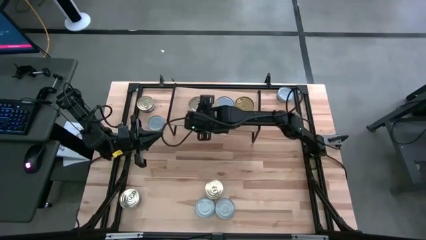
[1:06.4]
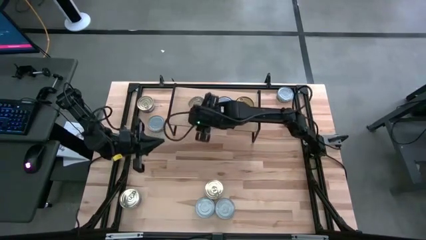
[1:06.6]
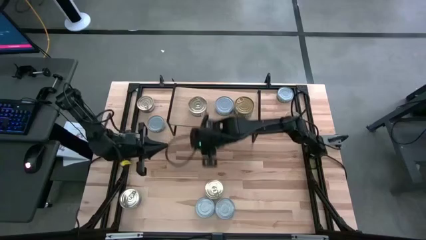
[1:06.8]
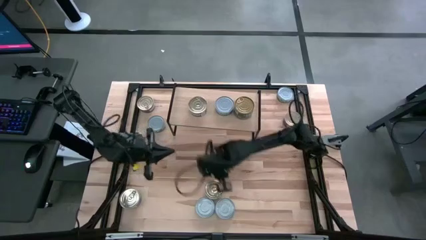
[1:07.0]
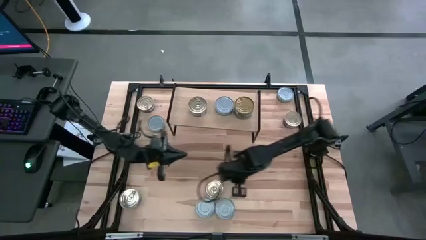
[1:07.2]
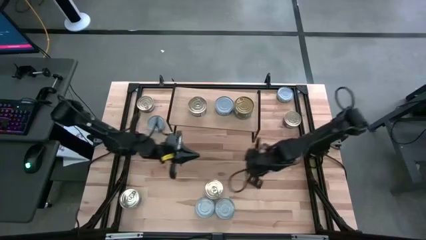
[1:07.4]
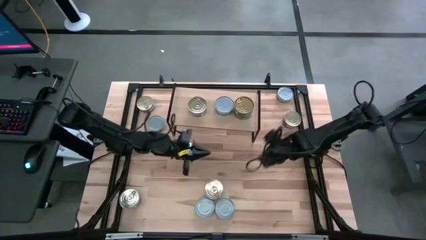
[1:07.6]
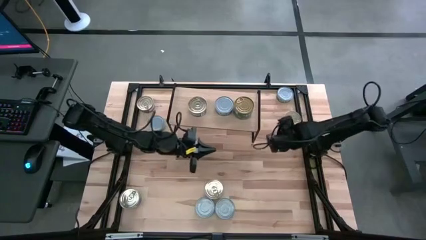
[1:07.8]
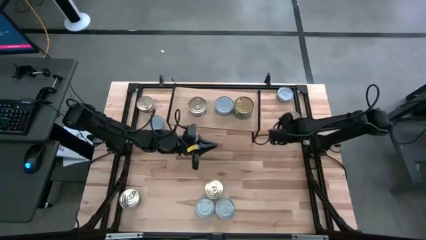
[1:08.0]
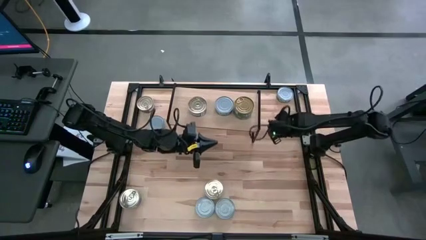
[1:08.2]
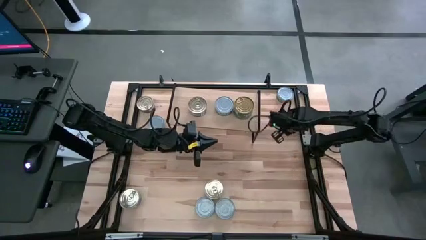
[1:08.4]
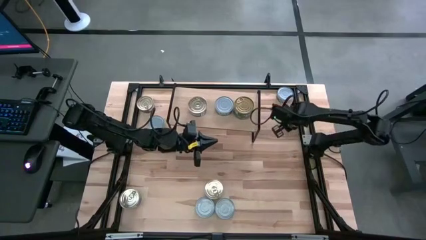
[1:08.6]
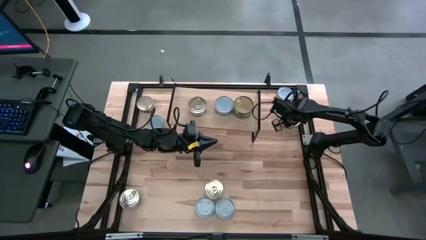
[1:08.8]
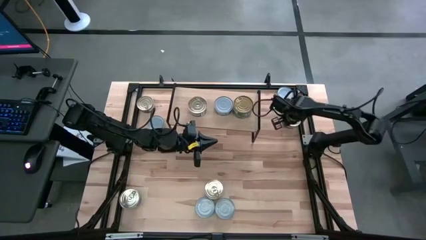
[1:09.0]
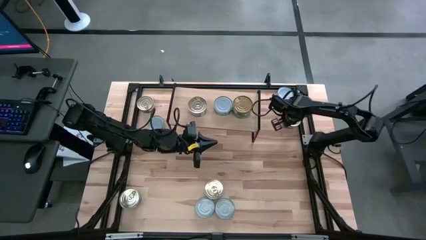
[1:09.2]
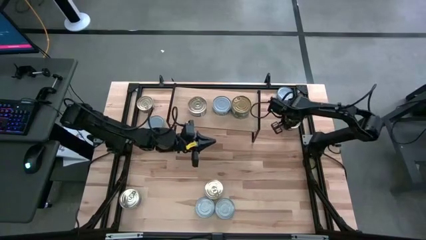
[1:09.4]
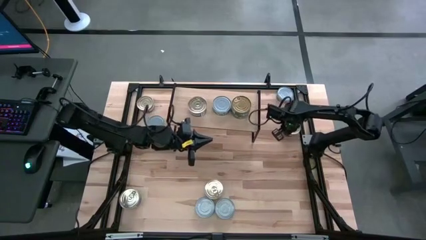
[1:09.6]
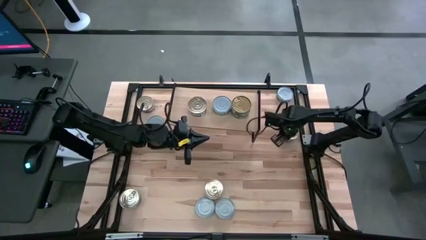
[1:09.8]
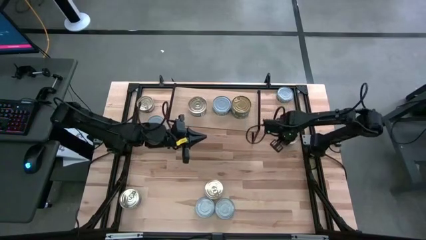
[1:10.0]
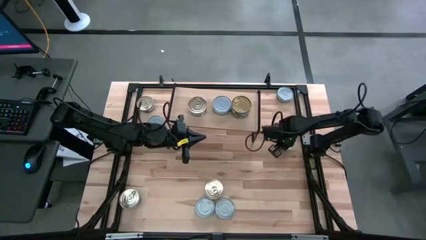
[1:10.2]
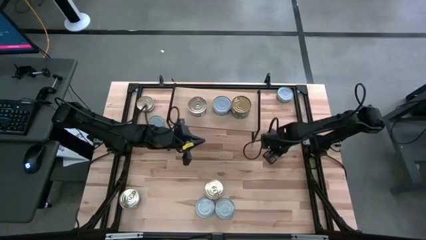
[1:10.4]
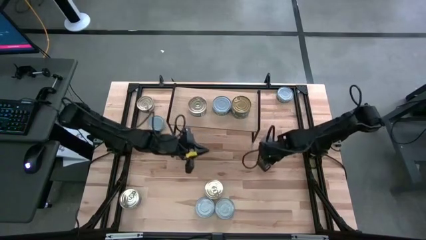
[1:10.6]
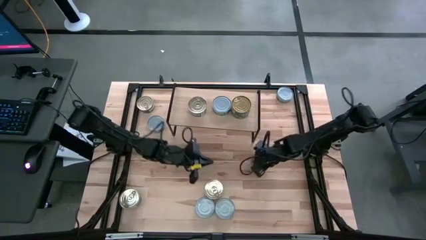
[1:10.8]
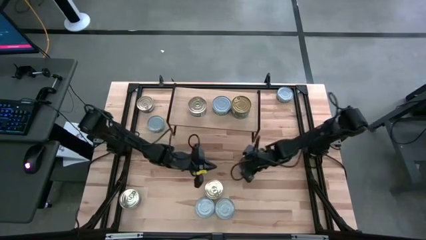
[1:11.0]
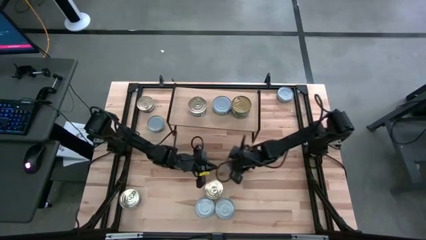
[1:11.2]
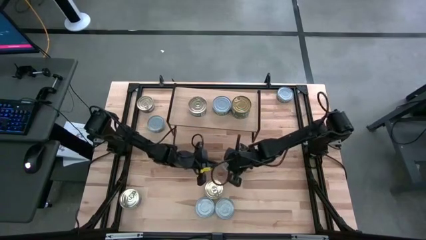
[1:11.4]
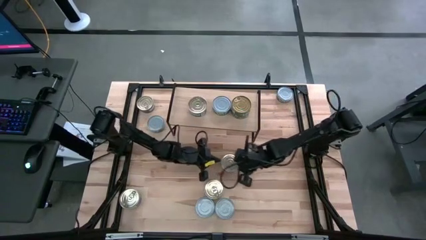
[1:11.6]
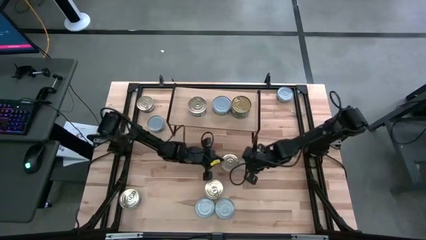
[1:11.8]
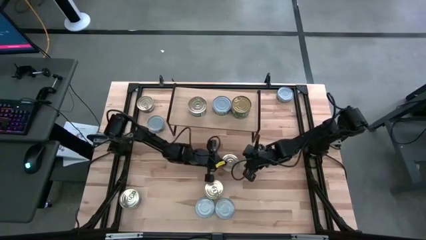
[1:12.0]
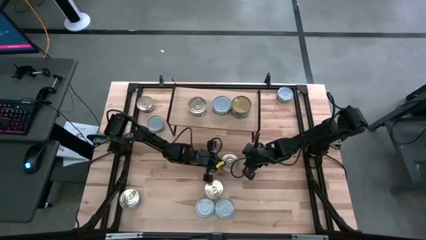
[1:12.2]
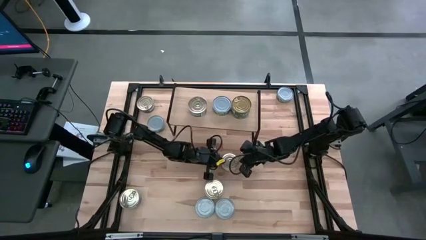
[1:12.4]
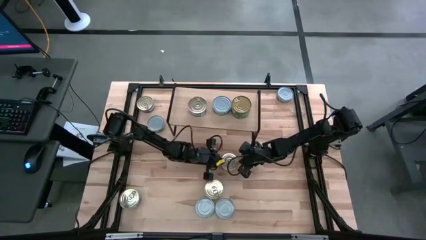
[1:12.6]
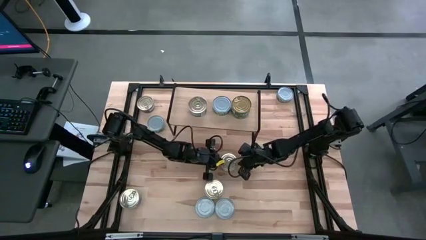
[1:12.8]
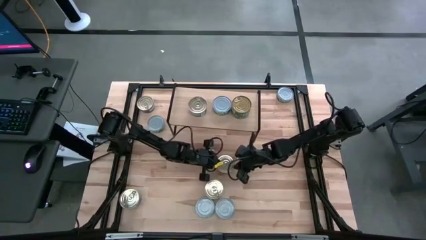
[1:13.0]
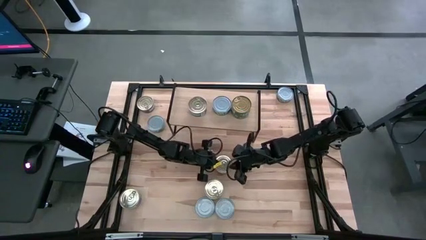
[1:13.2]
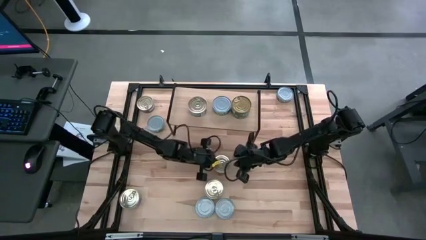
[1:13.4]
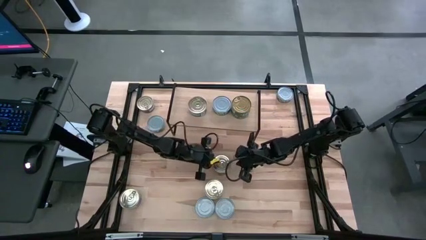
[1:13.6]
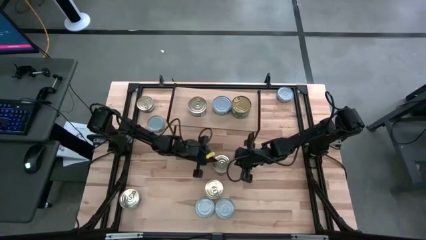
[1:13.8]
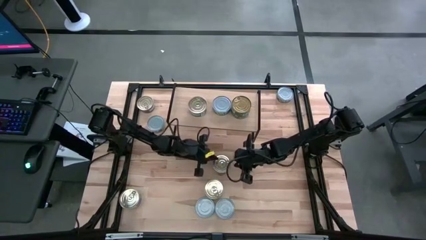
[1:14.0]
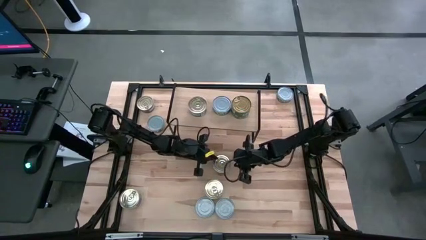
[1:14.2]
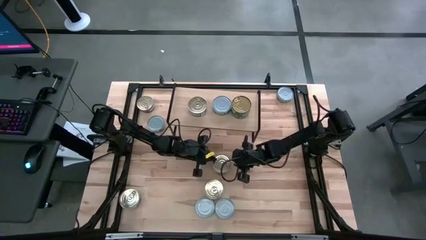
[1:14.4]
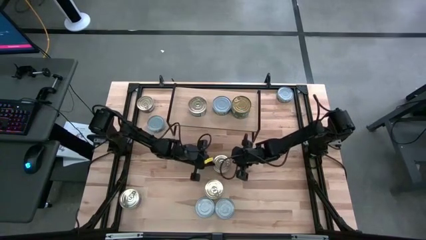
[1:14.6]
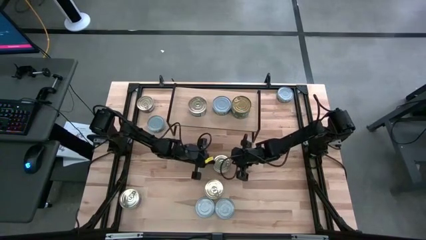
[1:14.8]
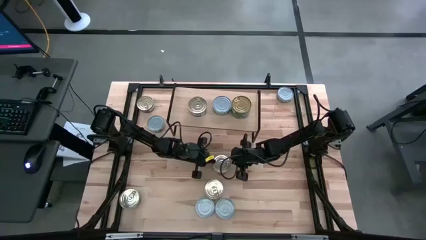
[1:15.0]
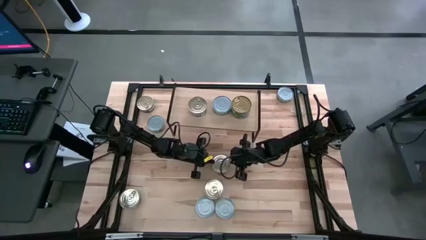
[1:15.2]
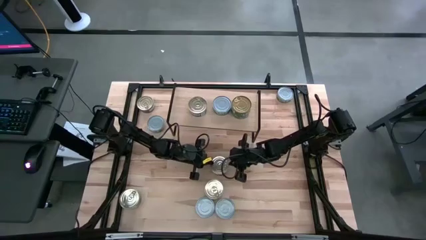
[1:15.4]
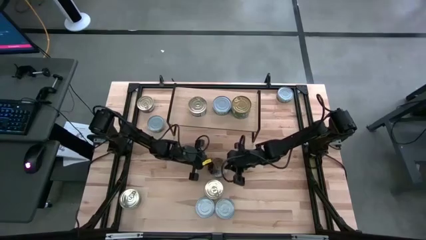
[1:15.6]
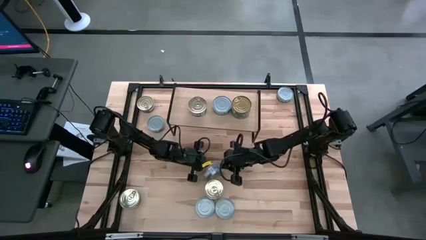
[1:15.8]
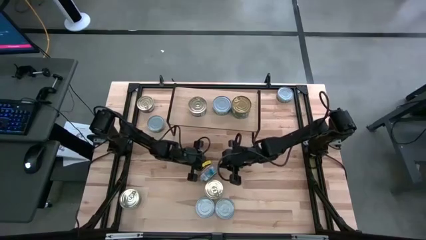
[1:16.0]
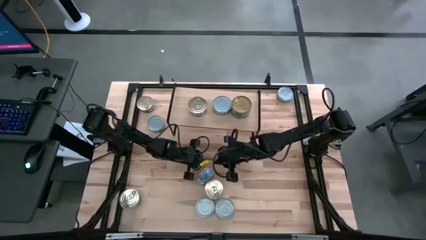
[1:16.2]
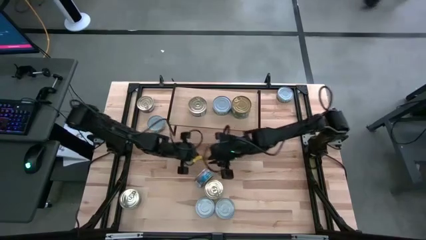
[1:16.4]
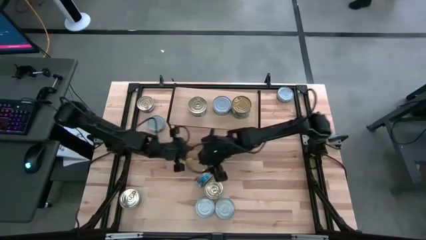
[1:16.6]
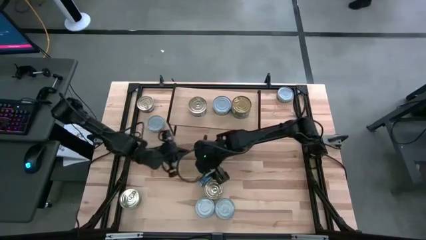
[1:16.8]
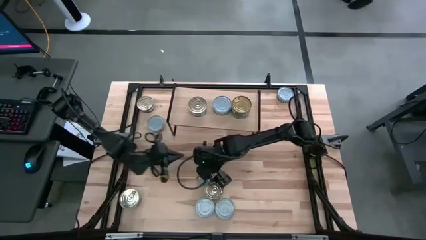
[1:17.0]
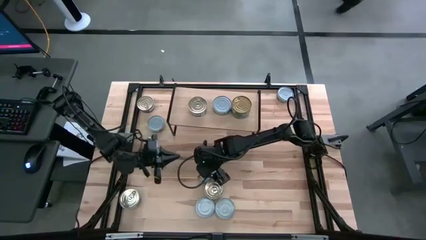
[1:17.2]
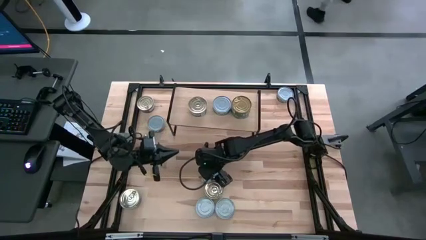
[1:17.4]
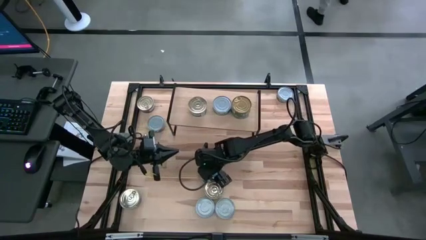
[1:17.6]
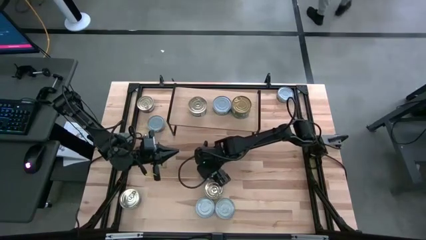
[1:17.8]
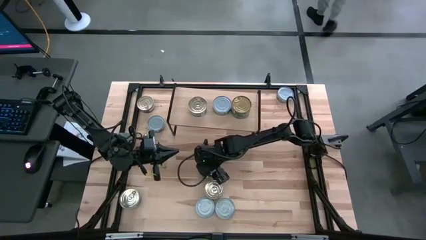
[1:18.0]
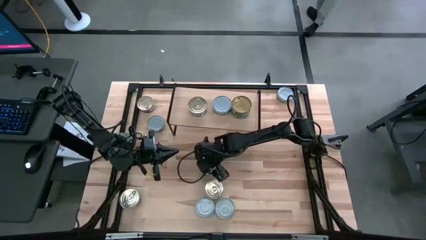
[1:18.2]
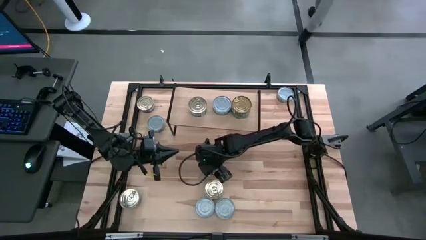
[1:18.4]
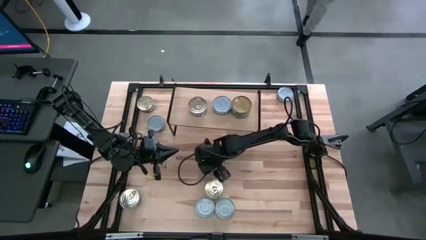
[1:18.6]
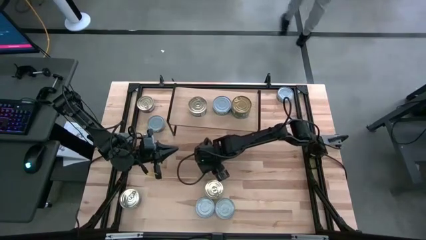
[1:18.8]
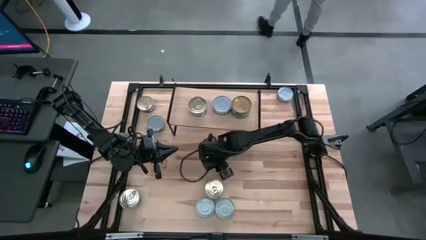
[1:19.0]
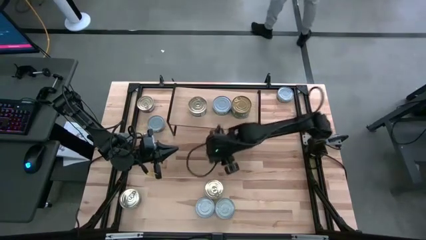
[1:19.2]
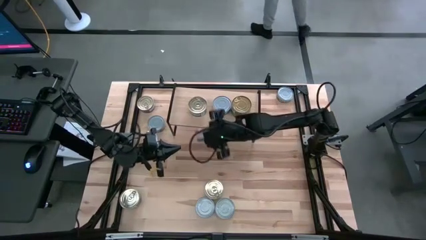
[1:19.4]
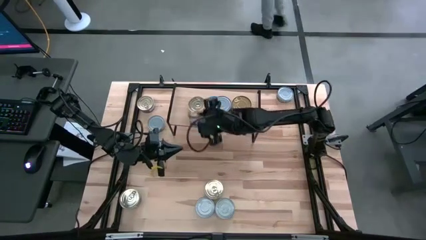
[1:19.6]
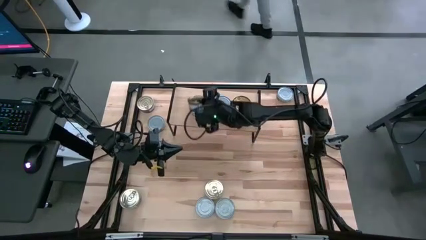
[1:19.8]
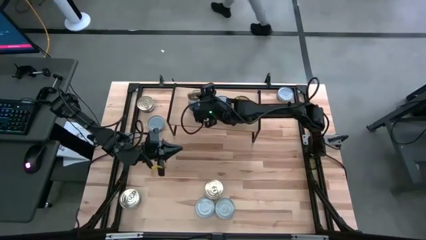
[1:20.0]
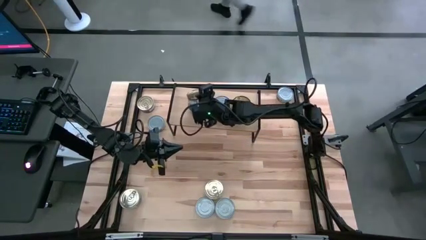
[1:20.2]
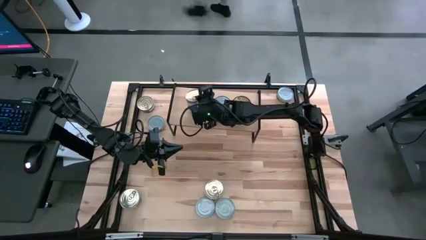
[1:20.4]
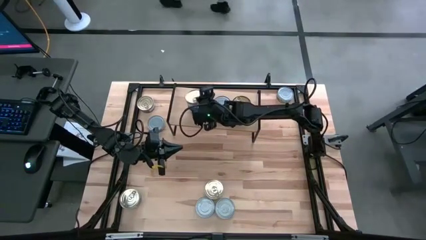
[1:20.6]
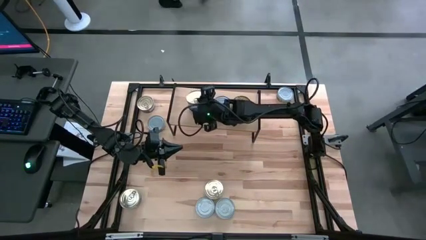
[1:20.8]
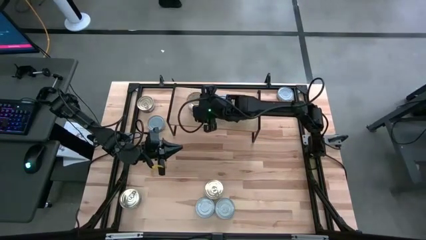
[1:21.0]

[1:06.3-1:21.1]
Task: Stack canned seafood by type on shelf
Stack the blue-pink tuna can on top of the blue-pink tuna can on the shelf
